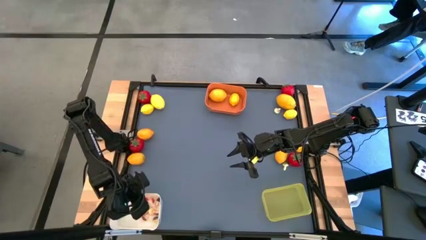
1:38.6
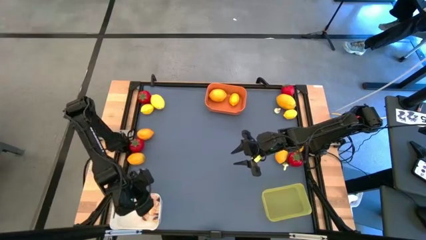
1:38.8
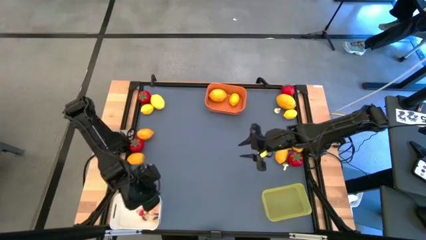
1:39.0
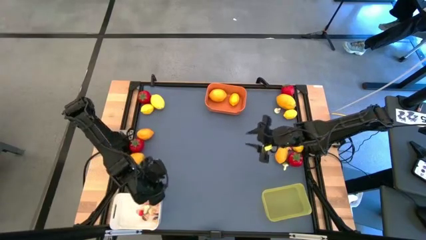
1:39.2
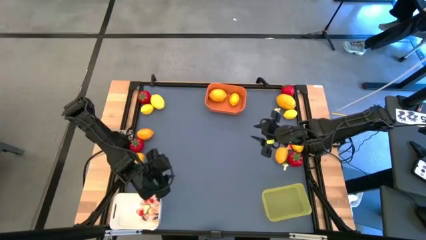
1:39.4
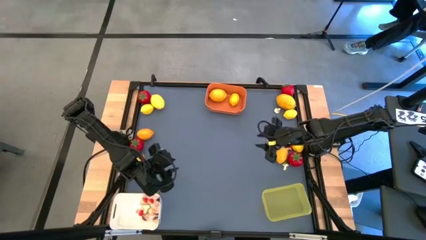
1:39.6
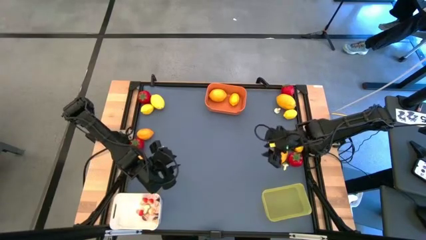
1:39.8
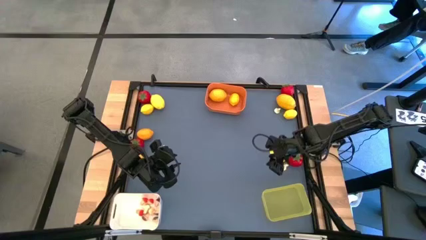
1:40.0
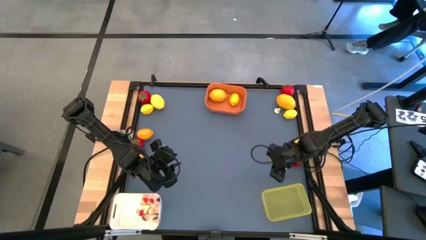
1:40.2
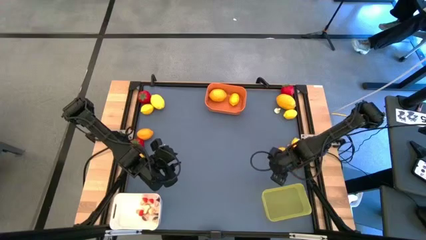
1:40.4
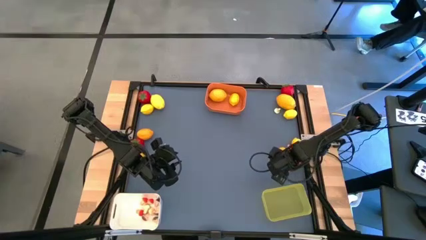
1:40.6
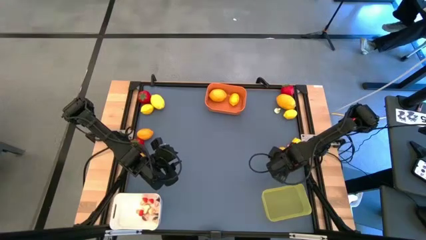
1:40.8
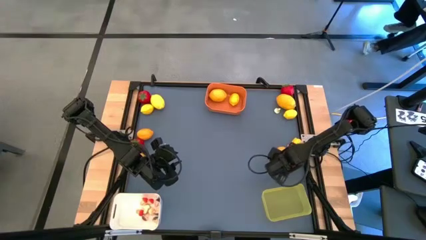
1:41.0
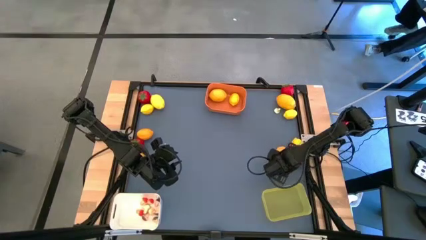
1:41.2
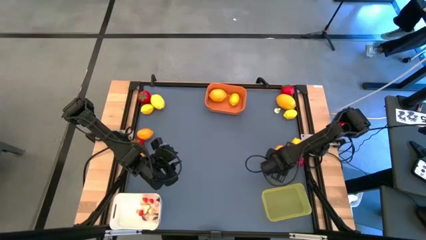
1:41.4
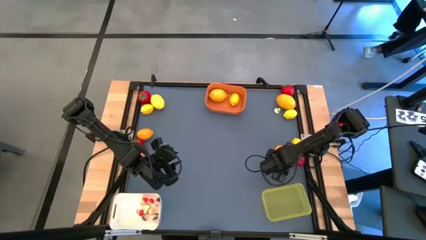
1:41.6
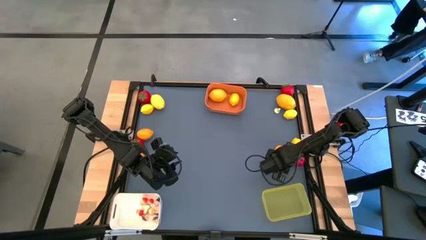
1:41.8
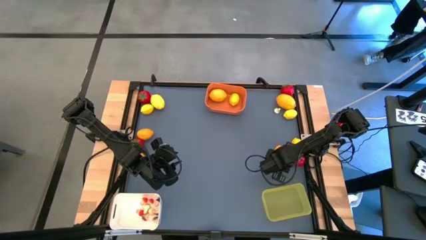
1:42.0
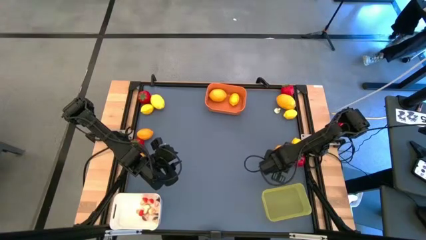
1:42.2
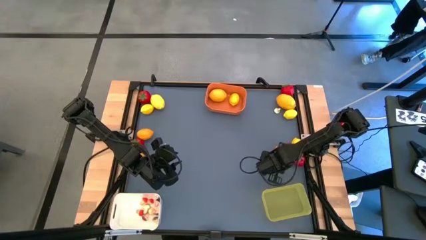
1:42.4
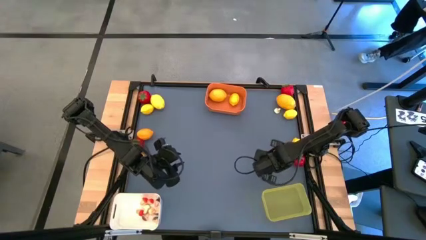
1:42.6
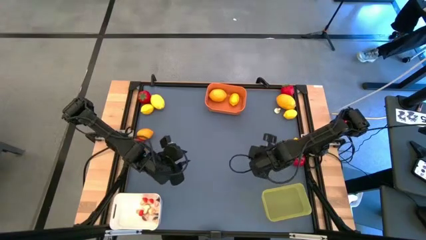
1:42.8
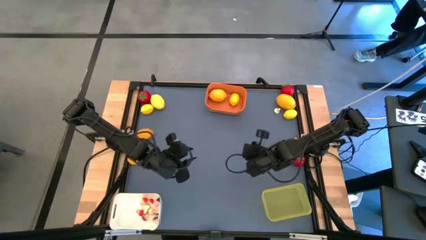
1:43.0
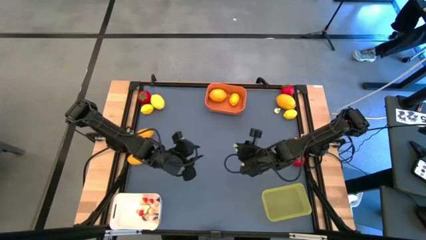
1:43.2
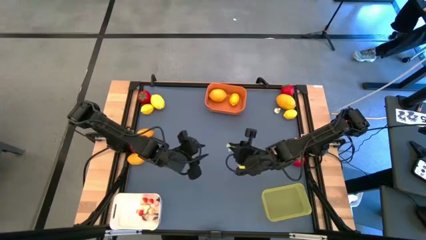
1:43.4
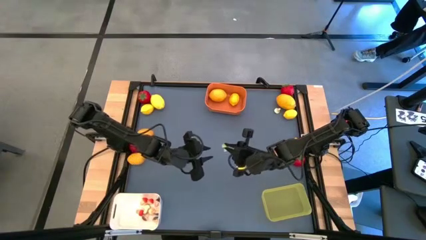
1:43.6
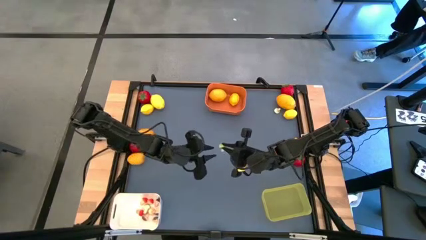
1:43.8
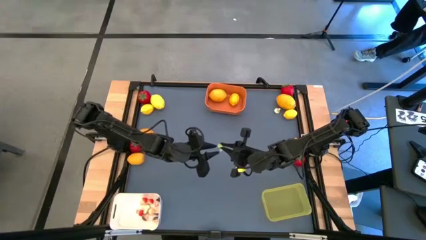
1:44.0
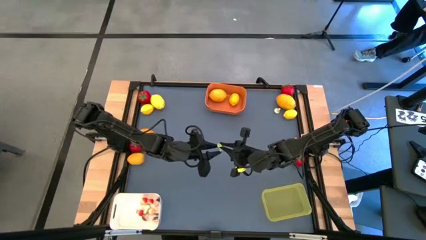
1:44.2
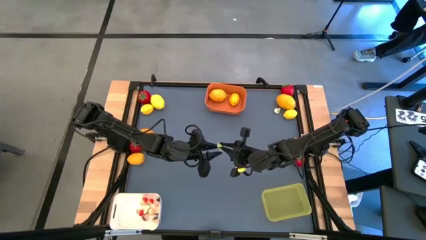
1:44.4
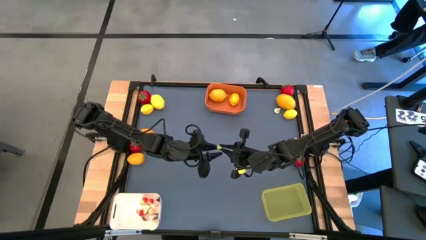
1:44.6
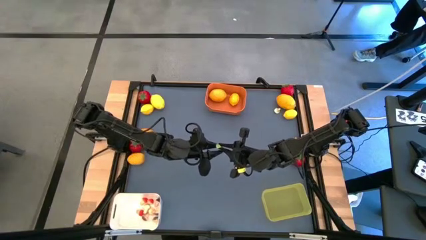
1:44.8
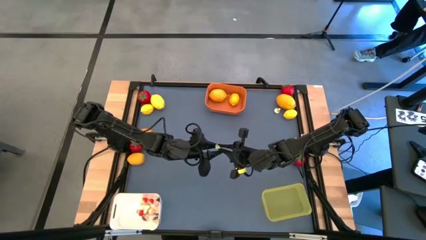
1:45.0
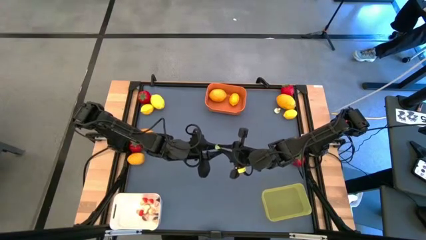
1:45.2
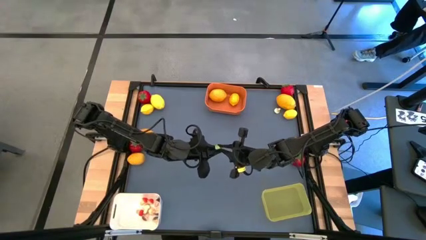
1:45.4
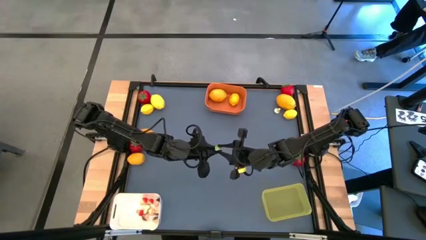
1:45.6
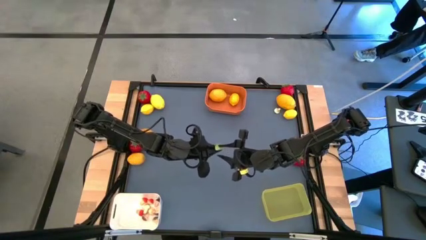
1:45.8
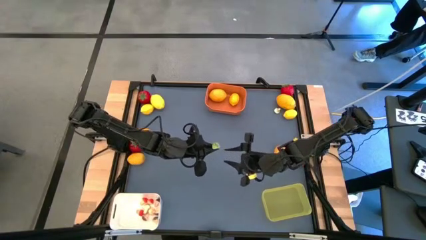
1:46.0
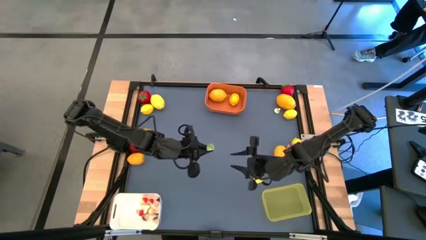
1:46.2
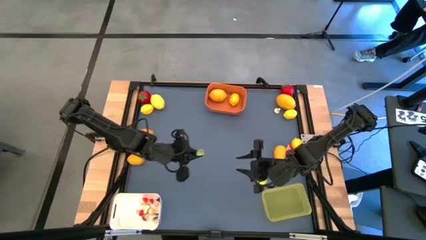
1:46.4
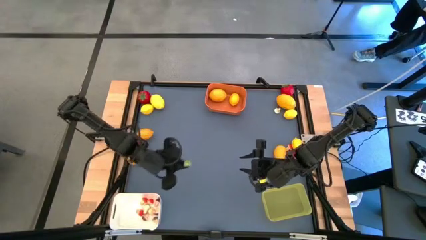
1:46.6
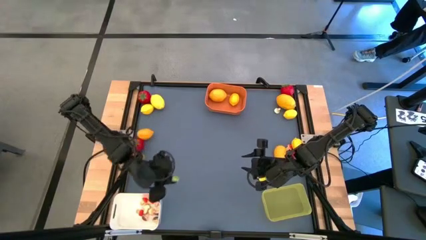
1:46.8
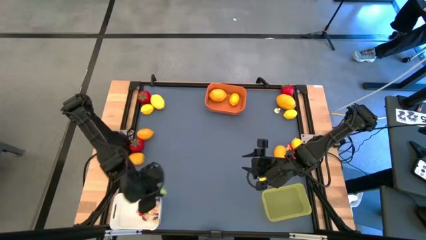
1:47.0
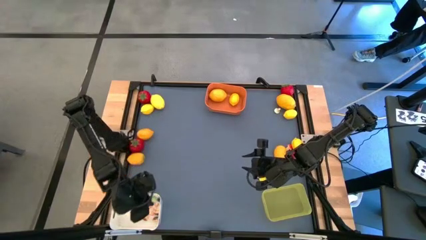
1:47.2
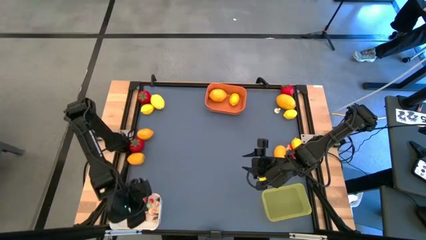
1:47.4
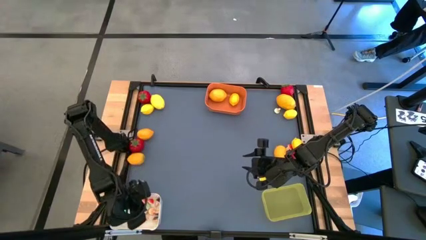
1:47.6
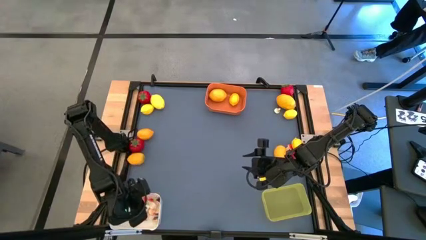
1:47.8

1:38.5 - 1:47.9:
Task: Sort produce into baskets
Put the green mushroom into the white bin

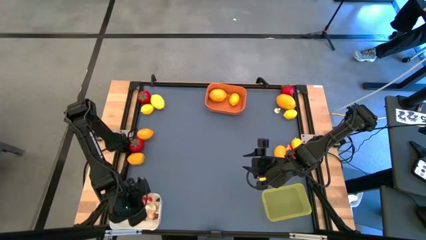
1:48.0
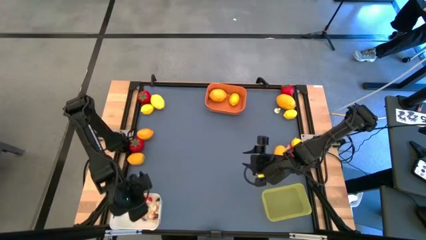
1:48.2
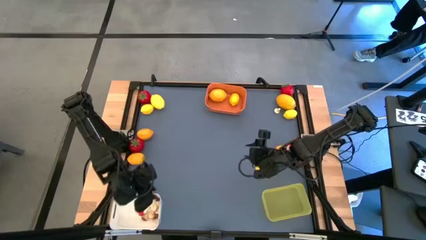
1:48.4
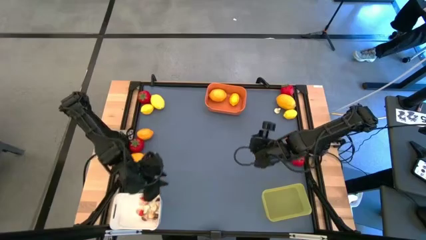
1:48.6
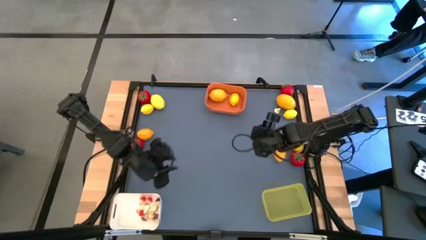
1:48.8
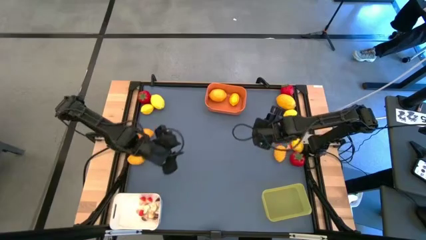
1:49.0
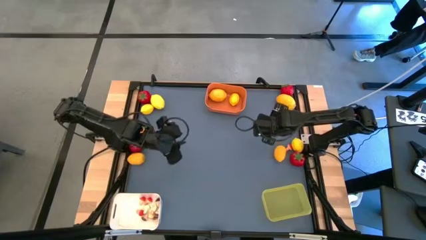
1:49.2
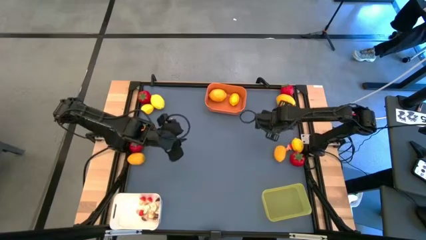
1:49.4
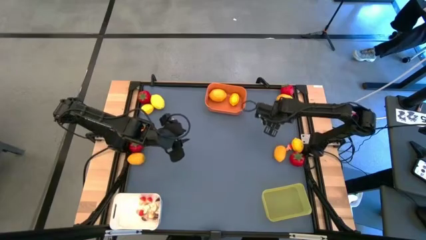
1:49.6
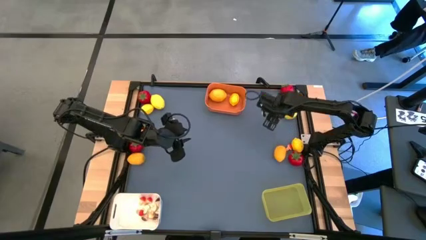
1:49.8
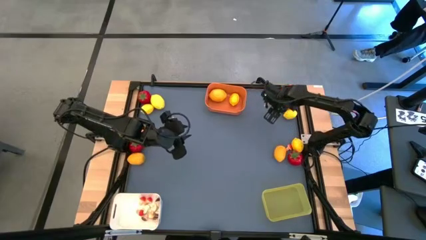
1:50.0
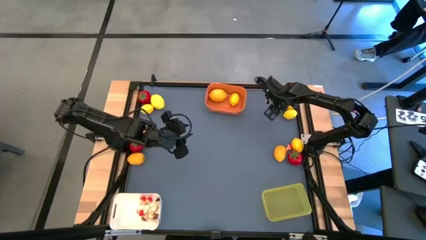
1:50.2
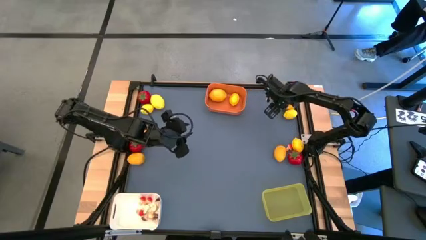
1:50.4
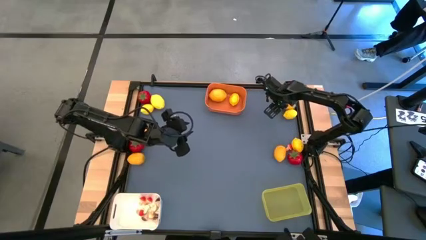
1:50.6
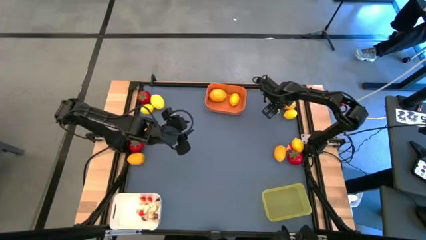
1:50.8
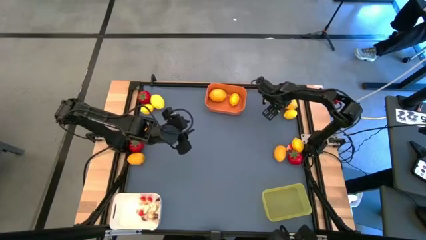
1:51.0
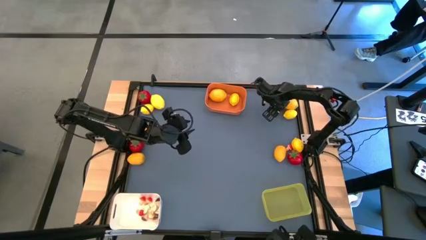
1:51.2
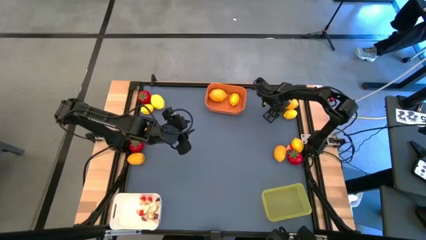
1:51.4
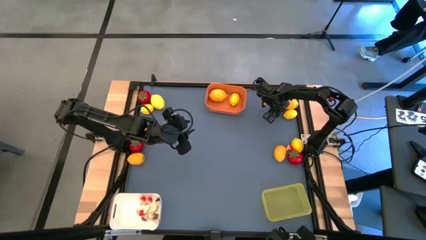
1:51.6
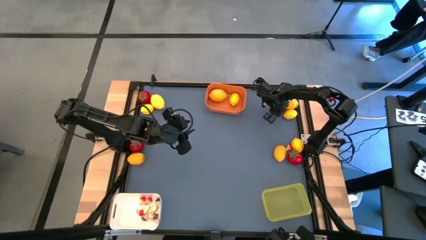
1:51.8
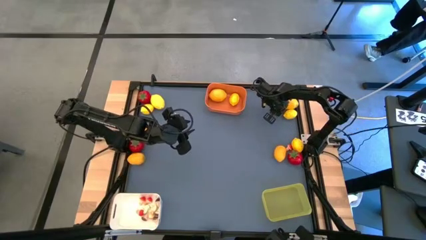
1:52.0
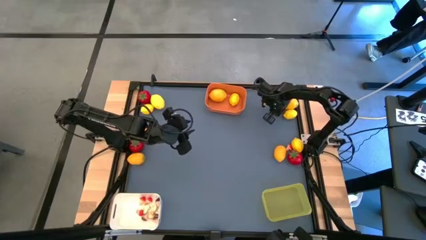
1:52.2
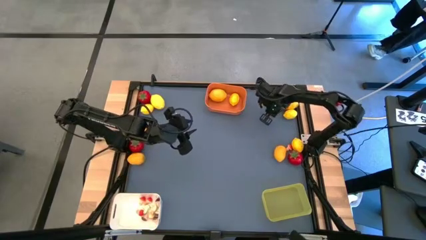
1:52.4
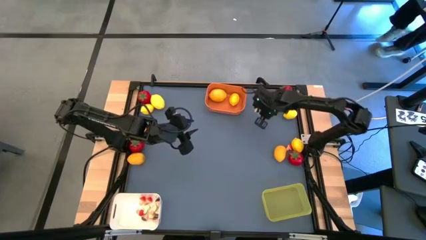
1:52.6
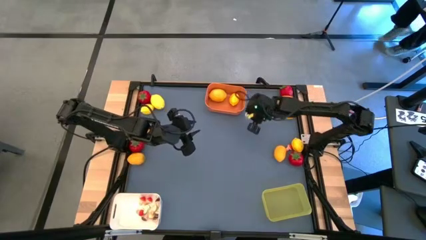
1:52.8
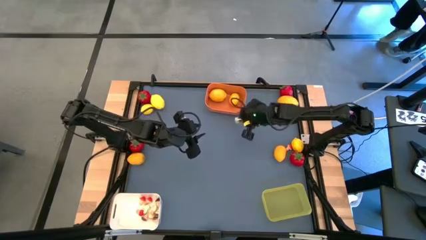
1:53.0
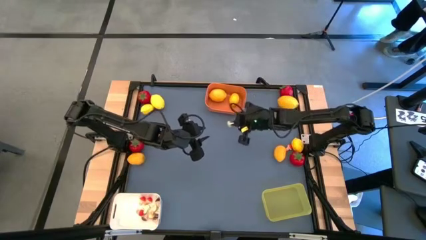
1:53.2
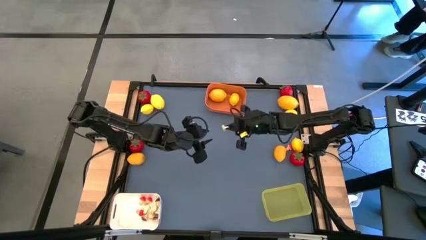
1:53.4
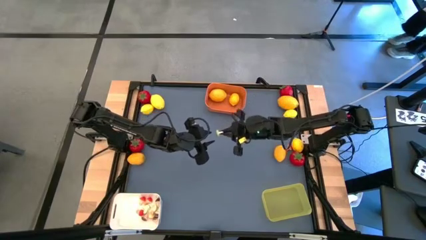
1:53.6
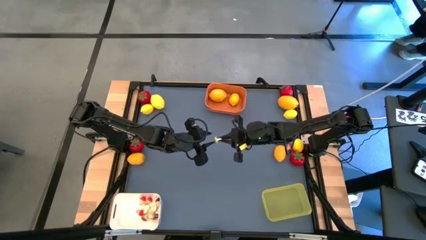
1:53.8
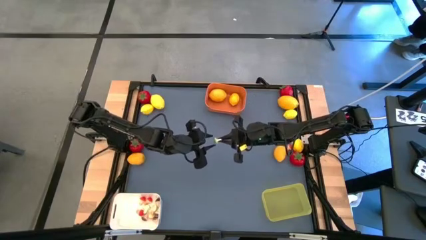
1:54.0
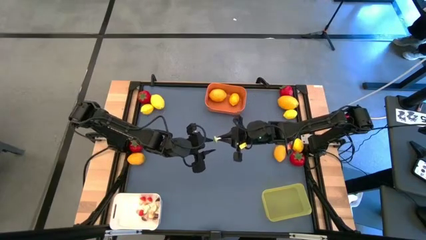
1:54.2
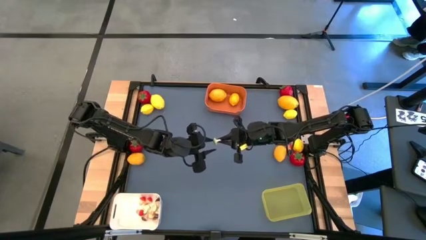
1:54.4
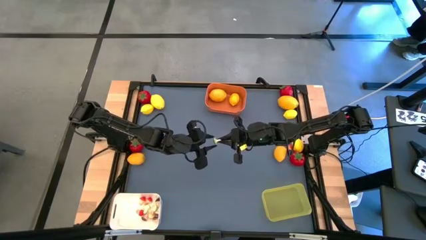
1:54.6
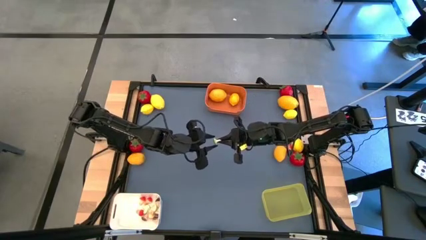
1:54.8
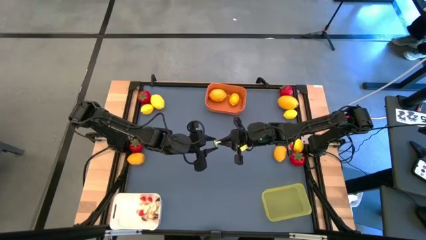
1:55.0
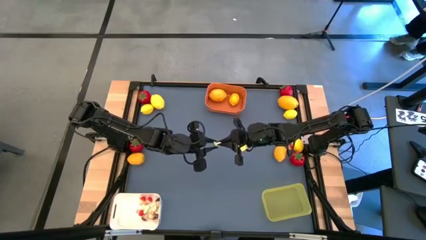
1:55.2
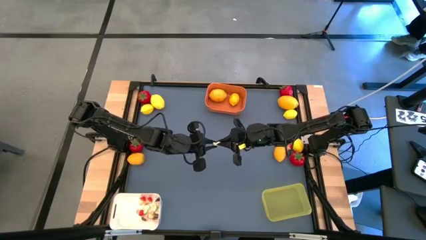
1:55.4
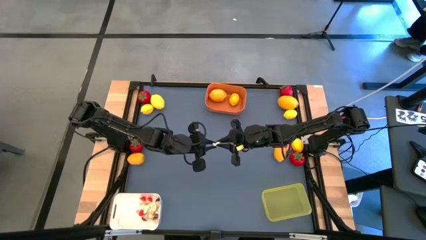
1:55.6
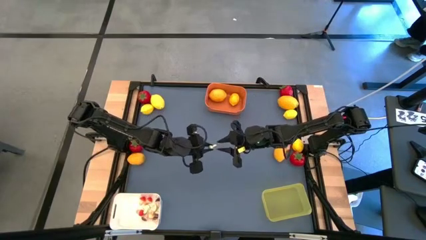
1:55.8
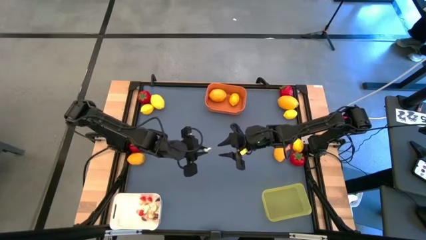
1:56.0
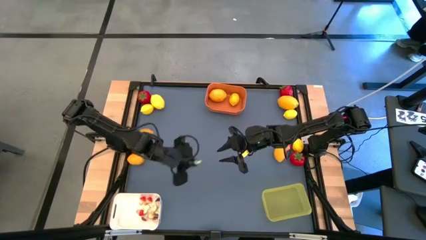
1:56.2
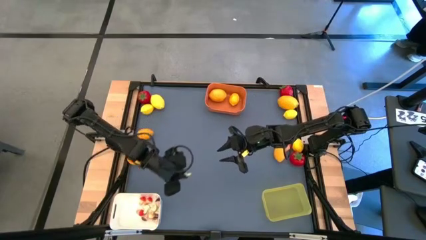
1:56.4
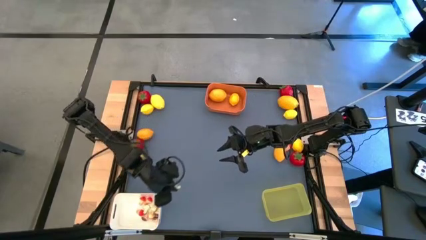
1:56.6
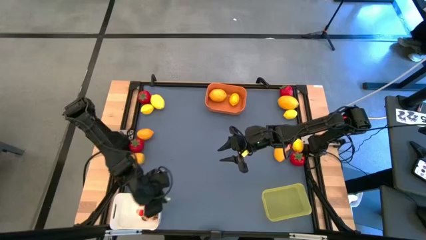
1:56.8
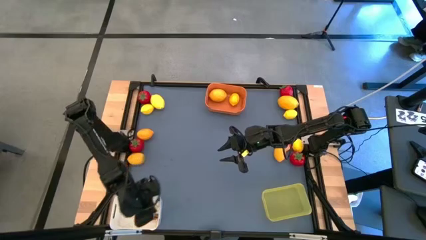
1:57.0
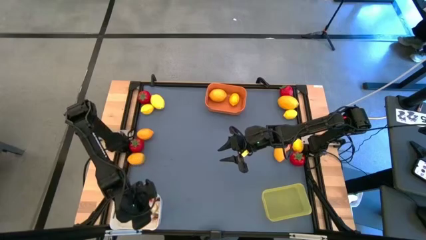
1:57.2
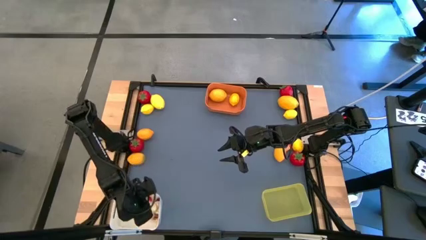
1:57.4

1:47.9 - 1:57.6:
Put the green mushroom into the white bin
